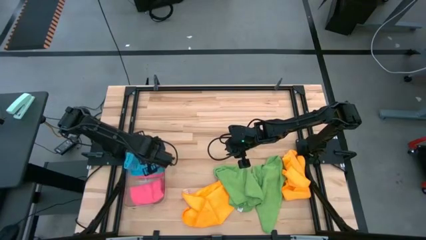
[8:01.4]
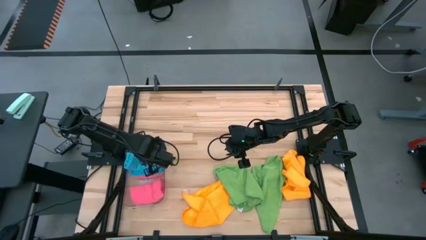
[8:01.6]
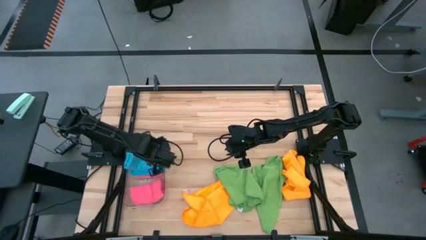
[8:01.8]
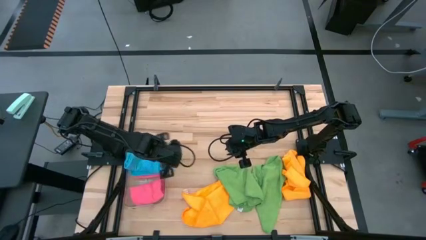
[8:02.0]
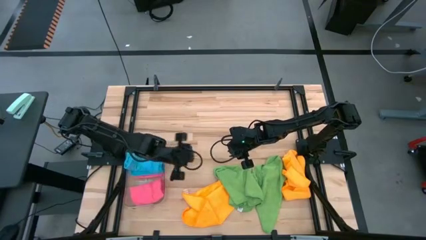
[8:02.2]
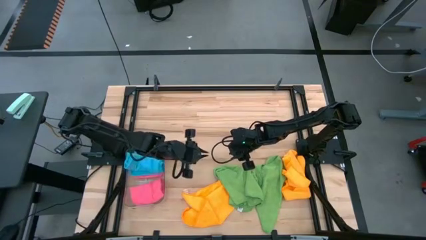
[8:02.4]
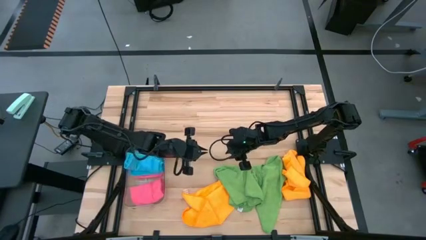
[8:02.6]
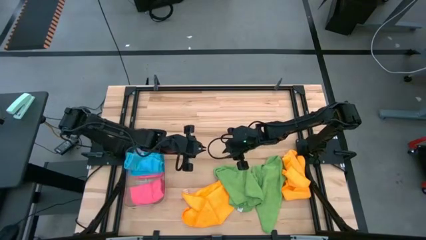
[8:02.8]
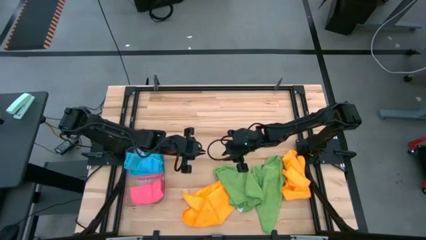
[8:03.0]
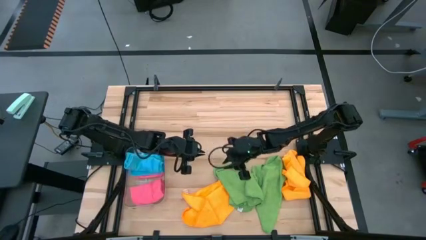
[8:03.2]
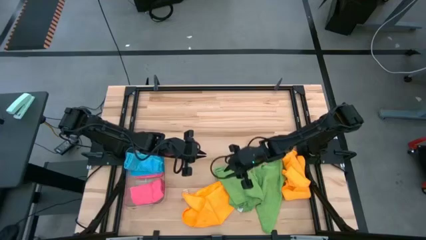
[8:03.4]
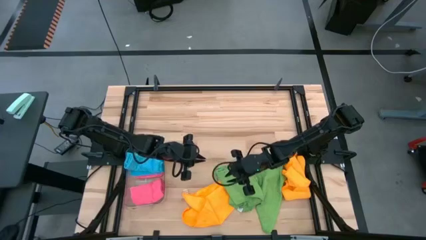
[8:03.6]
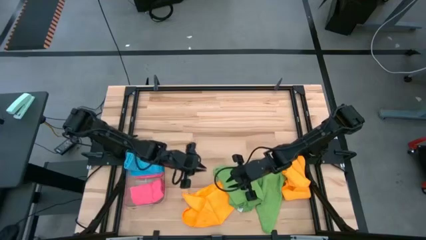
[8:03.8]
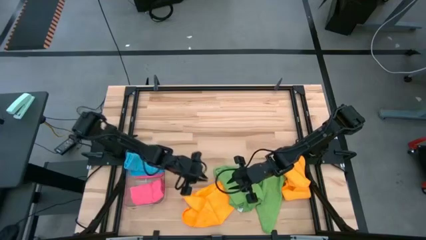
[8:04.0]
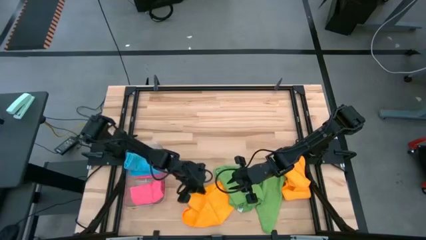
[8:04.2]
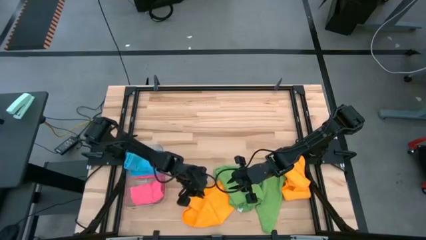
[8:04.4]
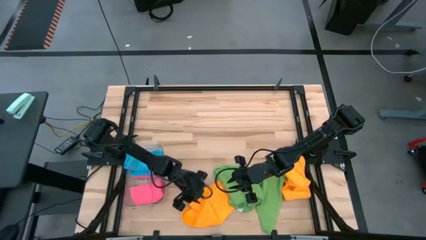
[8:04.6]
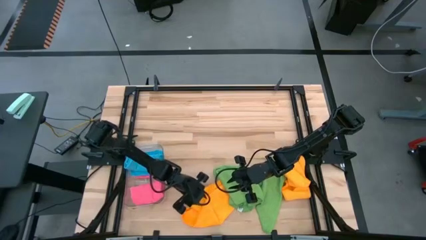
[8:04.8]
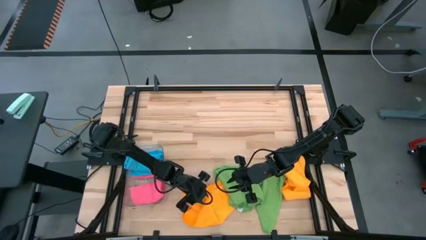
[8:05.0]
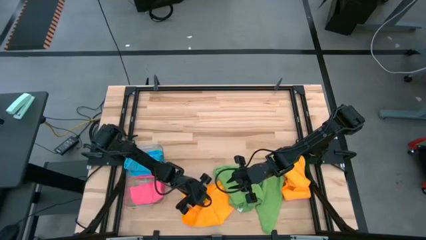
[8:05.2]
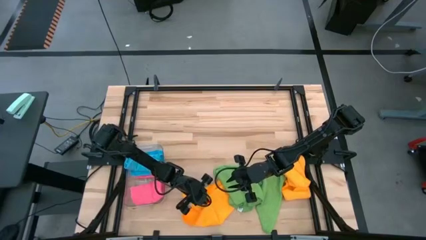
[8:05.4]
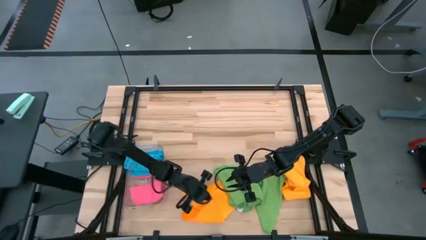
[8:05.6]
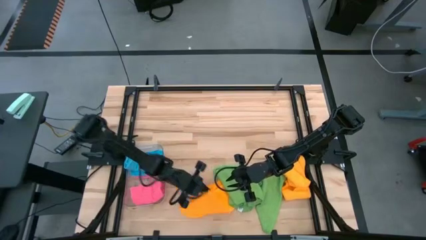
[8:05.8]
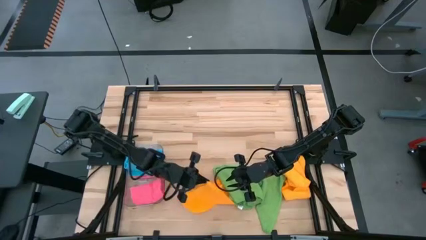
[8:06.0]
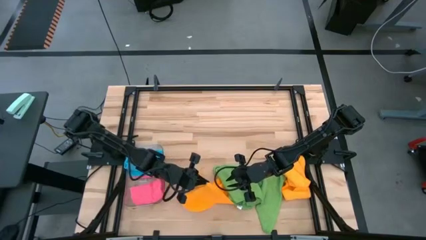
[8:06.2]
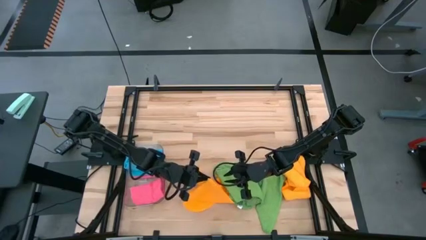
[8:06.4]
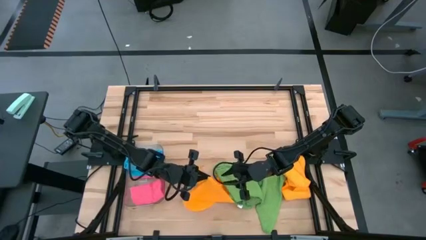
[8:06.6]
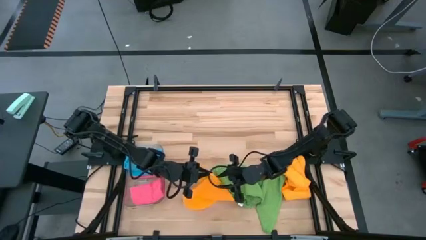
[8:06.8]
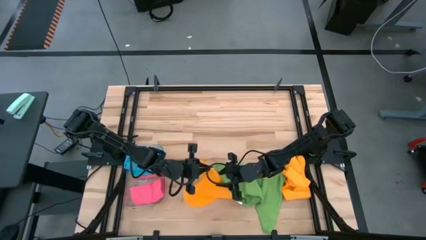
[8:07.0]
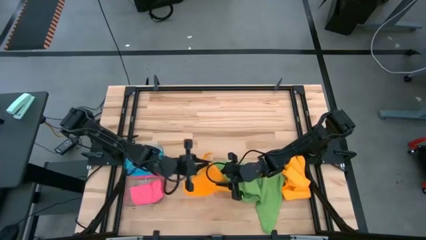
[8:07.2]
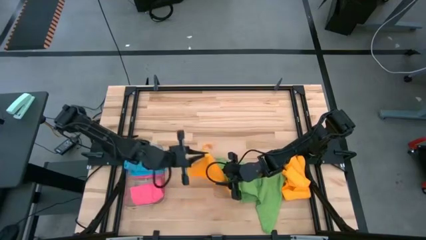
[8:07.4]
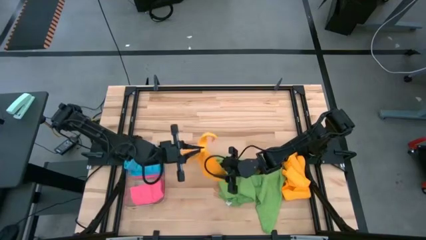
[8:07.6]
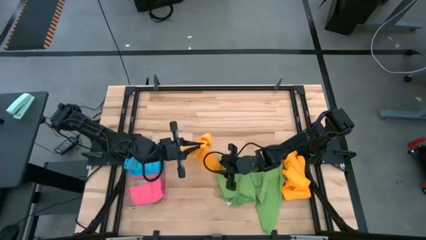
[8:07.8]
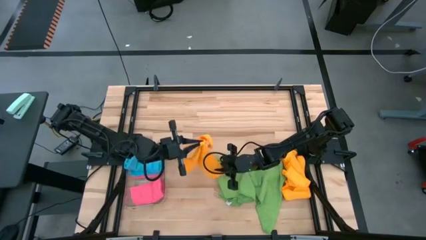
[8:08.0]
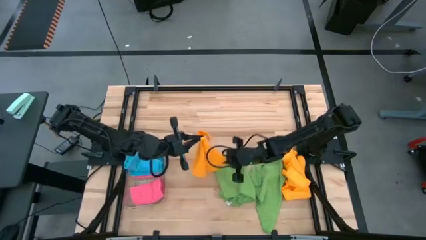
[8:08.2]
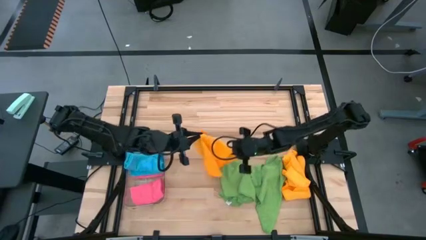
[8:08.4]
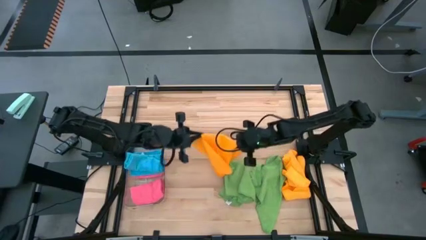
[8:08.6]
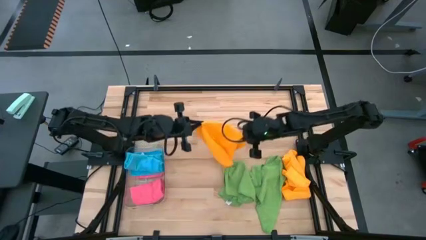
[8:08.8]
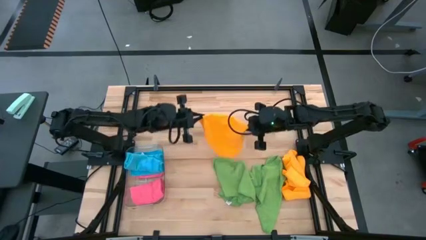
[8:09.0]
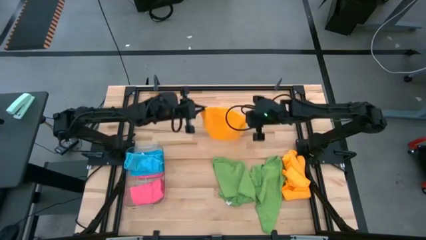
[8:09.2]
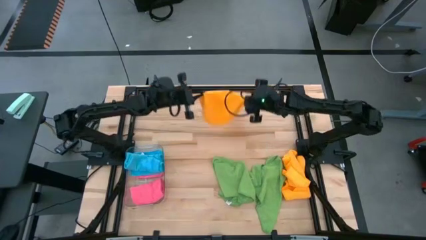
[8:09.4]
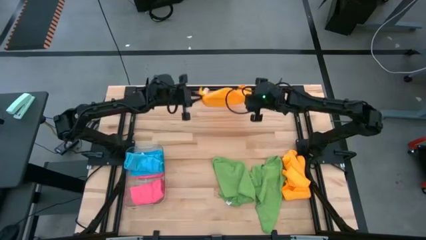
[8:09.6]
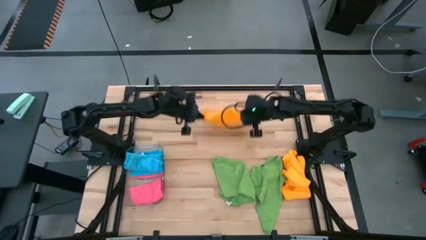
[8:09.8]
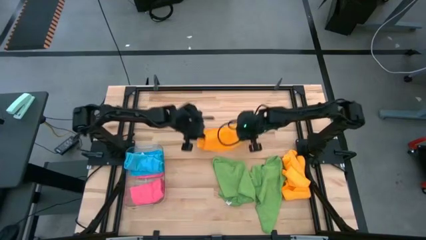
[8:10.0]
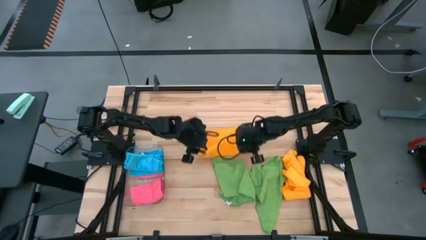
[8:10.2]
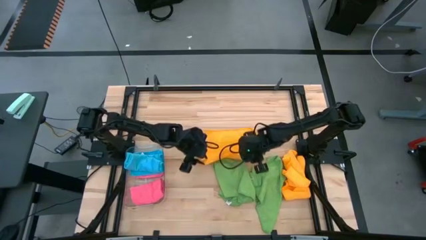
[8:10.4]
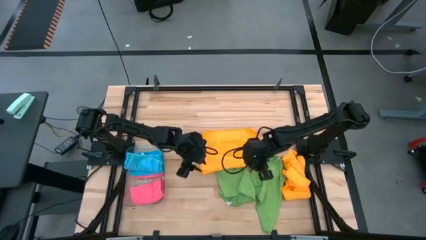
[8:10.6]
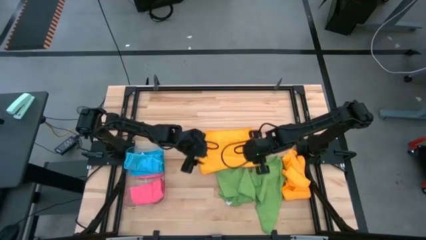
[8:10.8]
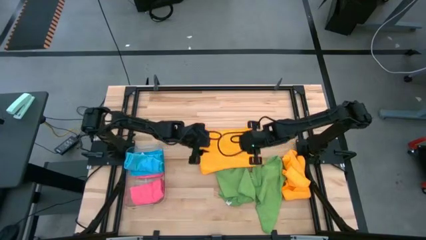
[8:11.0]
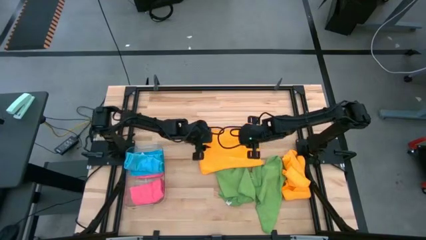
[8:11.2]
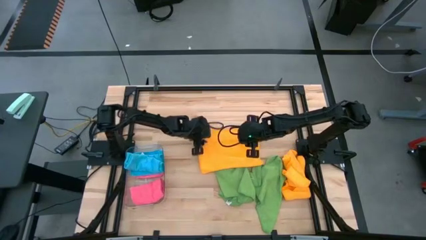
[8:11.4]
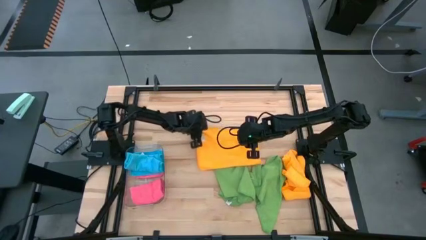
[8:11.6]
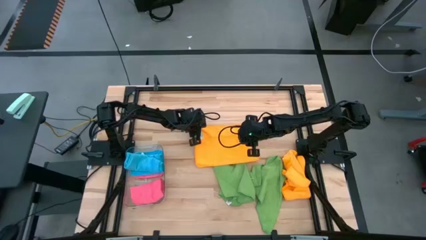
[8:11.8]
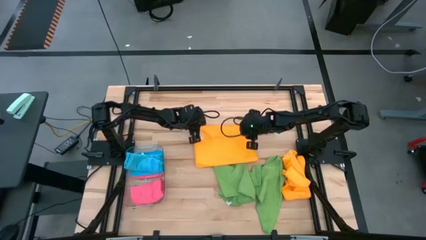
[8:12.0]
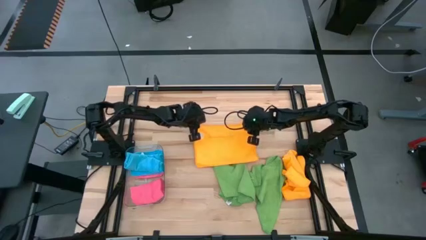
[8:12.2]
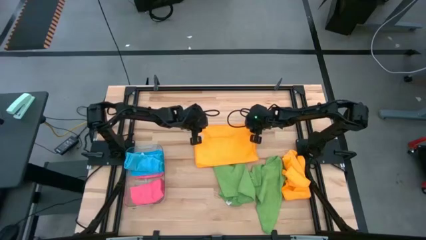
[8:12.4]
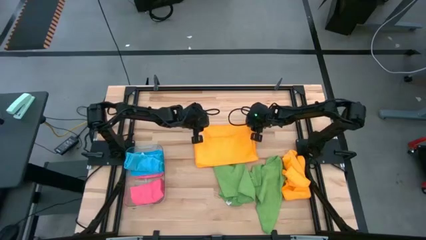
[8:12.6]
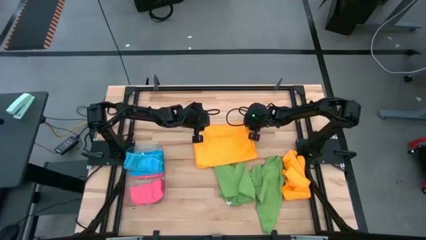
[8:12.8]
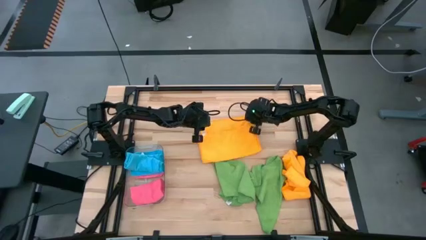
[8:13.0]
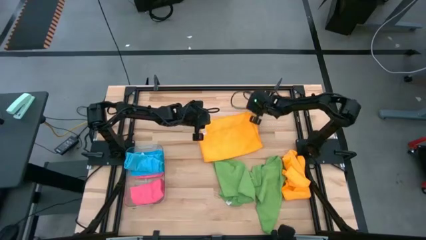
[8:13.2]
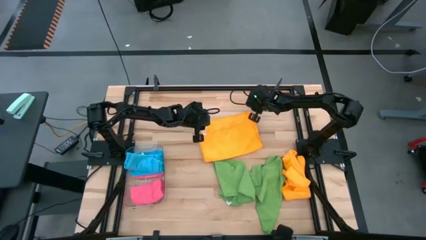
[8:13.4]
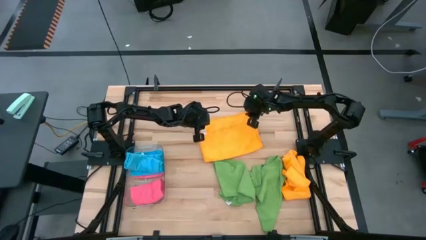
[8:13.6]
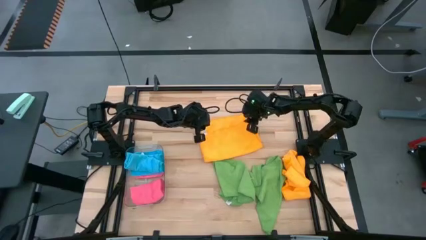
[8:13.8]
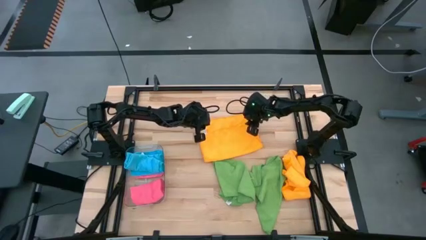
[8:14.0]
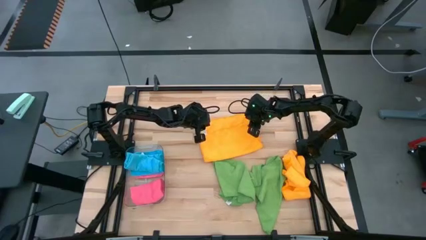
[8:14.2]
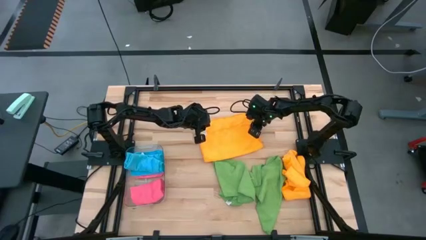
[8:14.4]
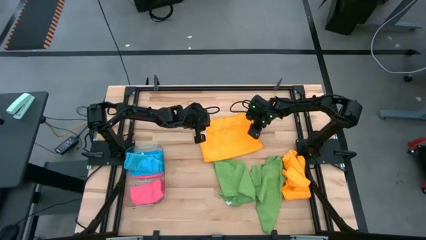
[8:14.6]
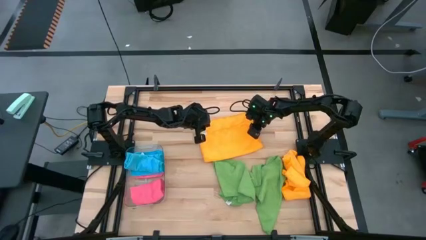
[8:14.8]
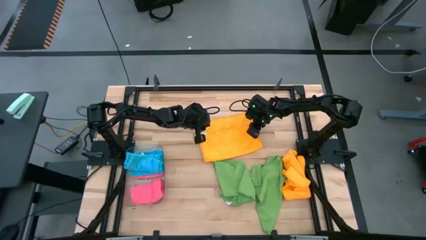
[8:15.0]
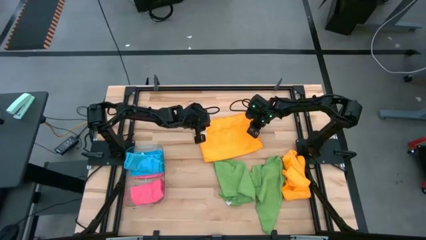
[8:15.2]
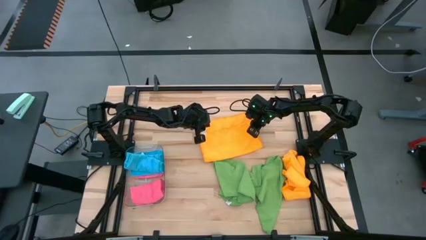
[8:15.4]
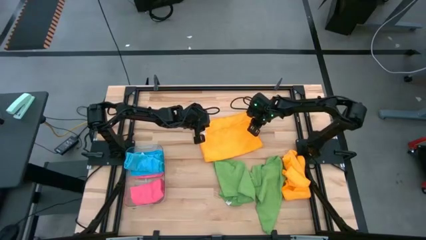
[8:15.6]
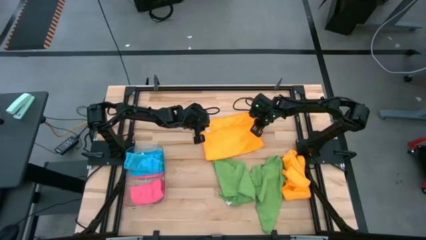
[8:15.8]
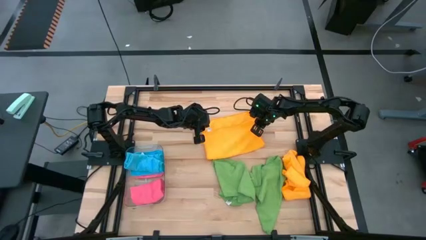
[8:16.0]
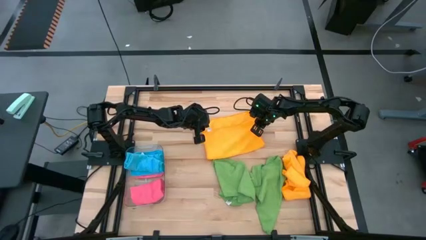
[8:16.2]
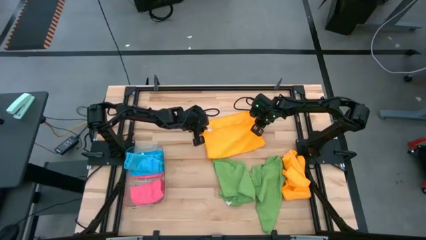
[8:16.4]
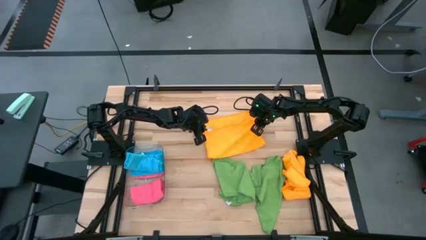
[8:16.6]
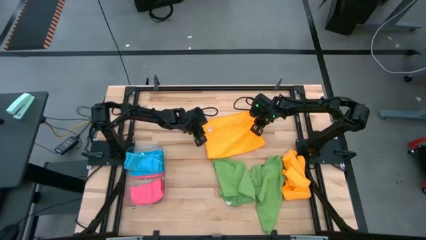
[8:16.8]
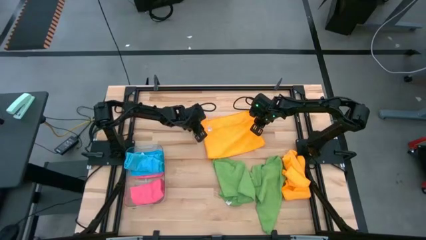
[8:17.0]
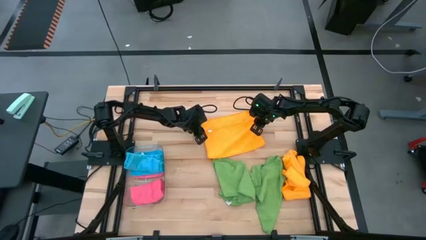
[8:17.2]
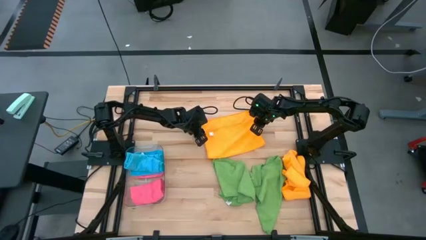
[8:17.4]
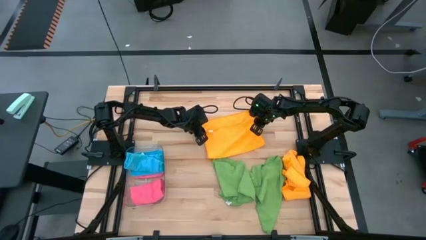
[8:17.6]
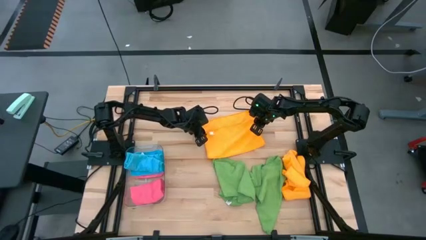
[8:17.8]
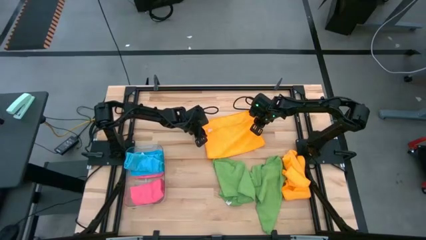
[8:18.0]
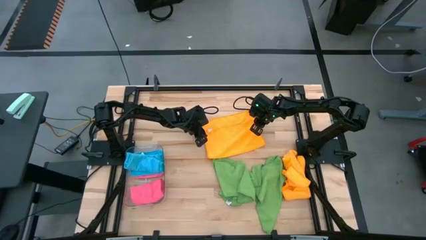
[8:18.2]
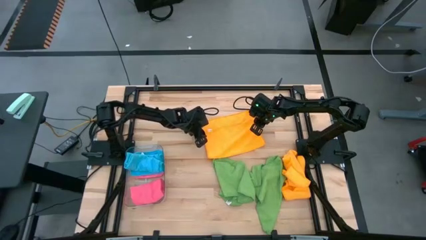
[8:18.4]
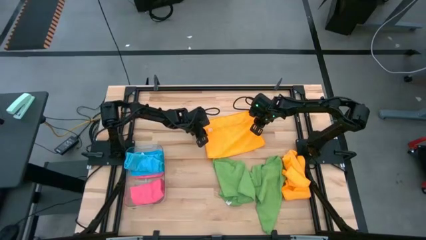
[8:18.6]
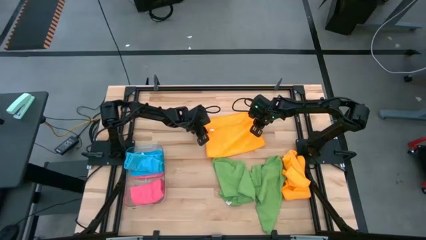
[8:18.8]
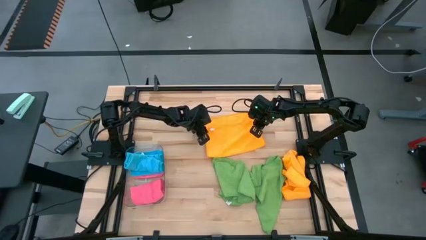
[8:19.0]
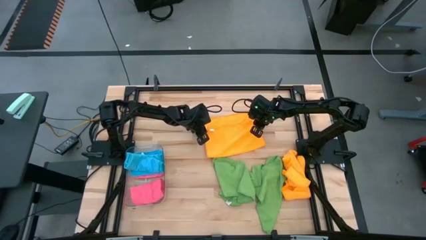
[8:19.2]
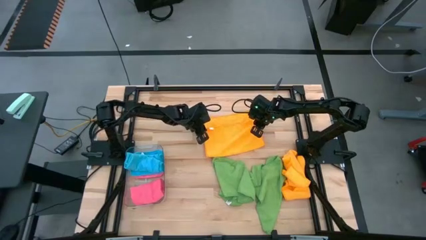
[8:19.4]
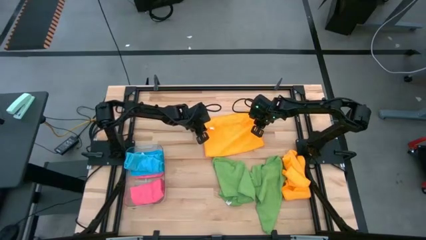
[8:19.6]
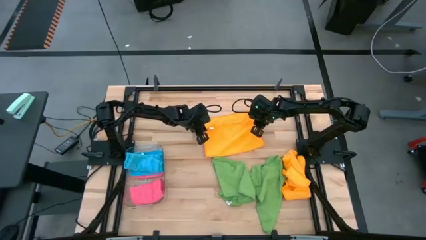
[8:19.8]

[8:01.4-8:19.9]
Task: Fold microfiber towels
Fold the left yellow microfiber cloth
